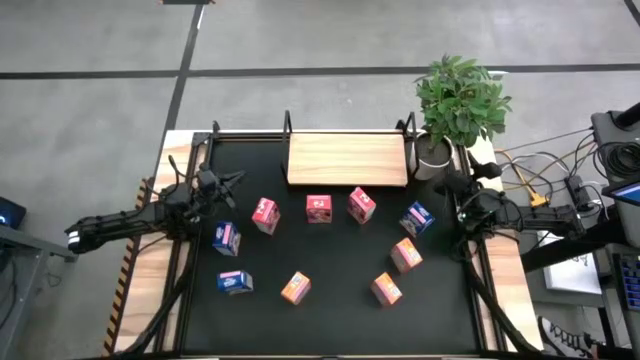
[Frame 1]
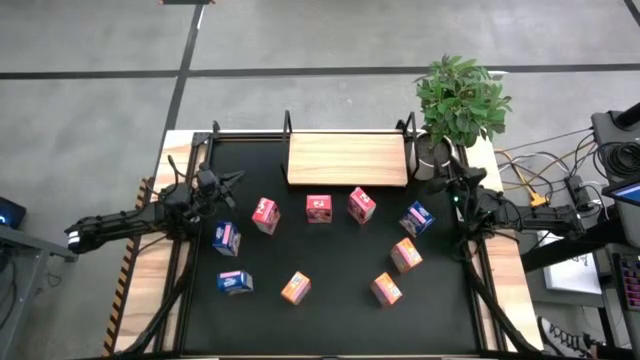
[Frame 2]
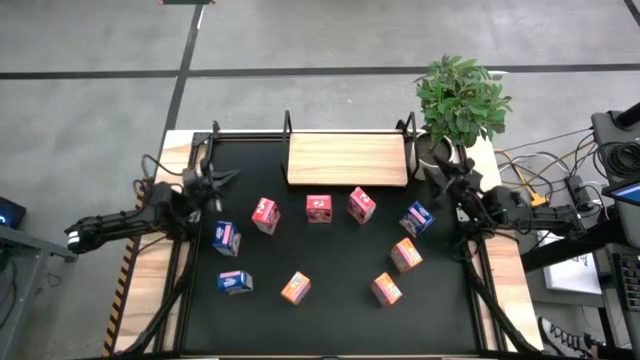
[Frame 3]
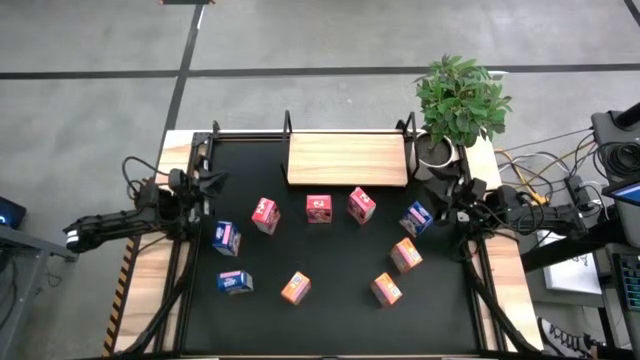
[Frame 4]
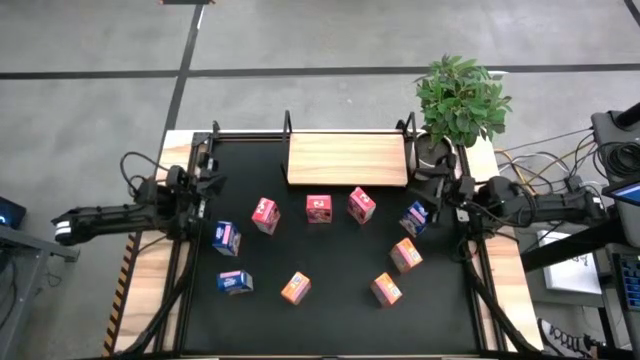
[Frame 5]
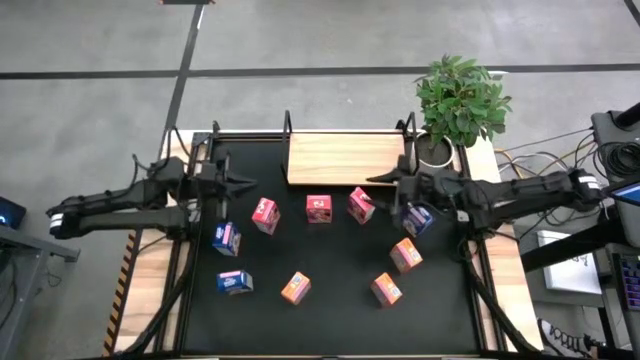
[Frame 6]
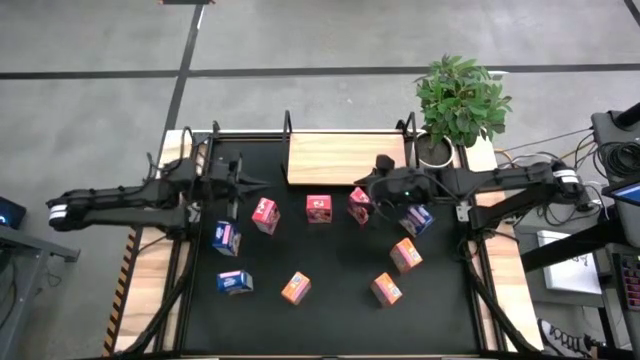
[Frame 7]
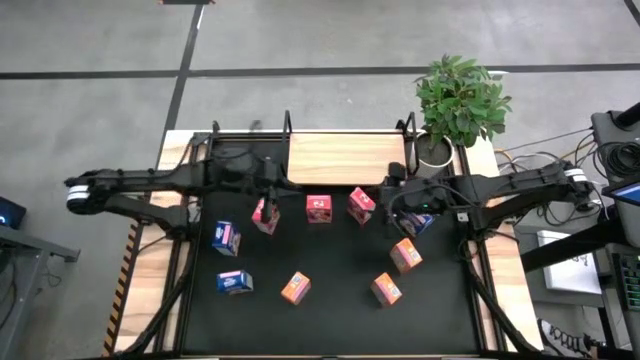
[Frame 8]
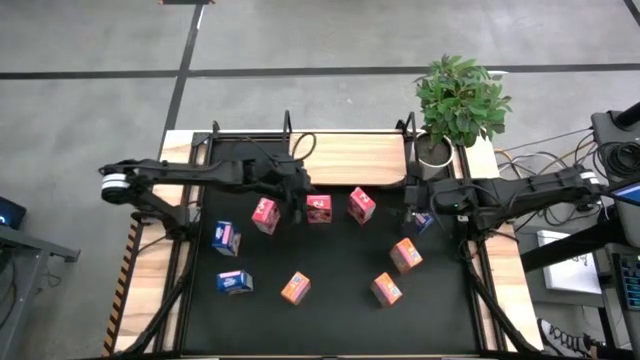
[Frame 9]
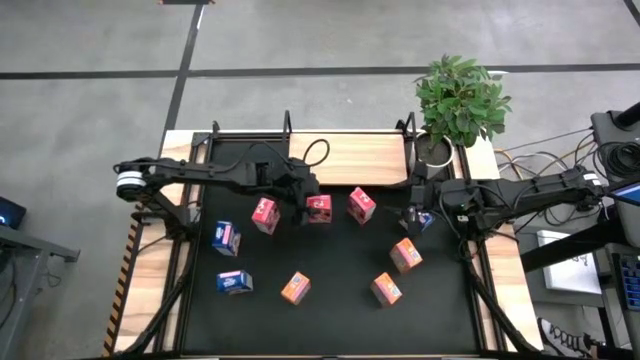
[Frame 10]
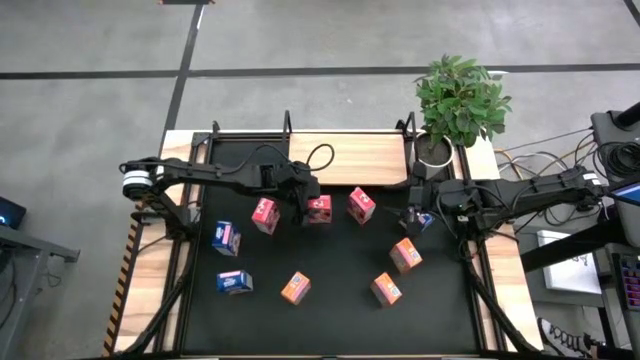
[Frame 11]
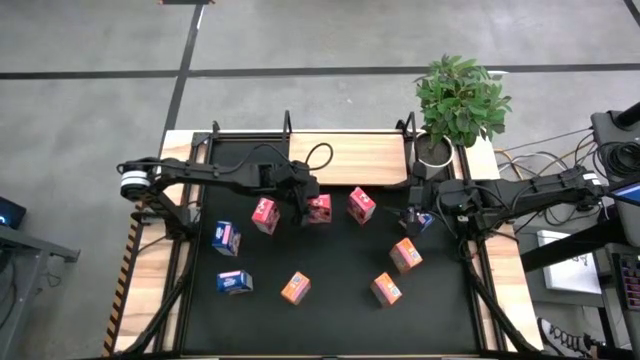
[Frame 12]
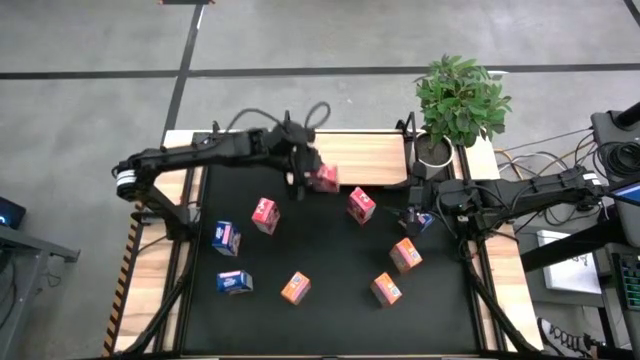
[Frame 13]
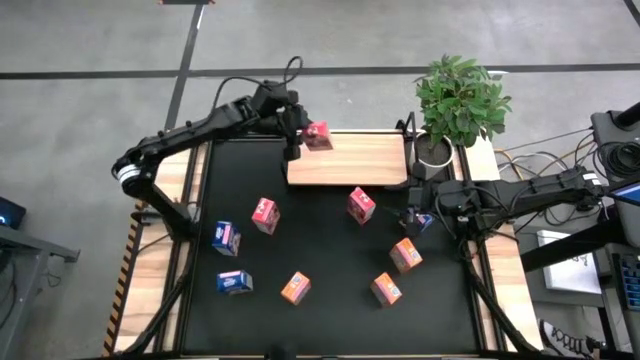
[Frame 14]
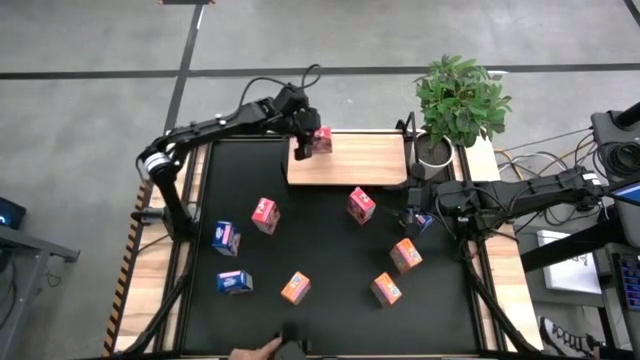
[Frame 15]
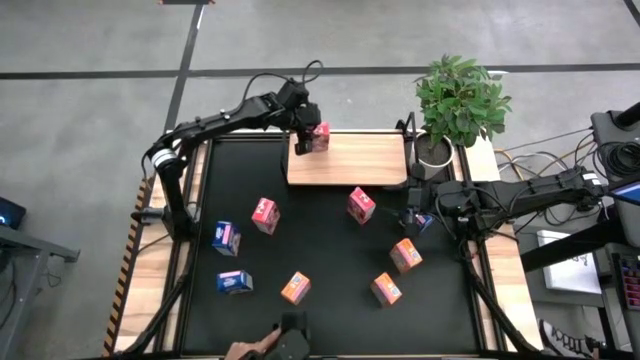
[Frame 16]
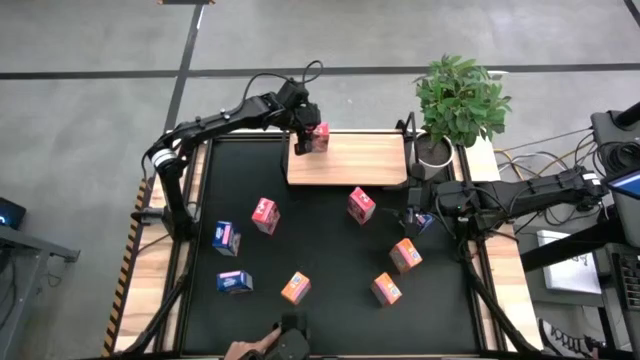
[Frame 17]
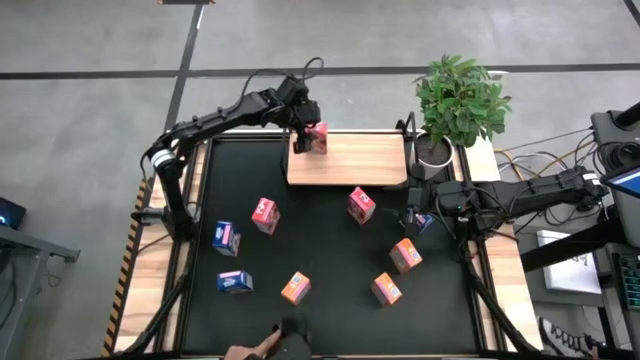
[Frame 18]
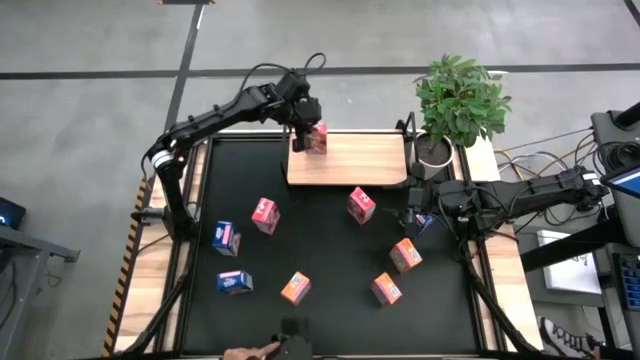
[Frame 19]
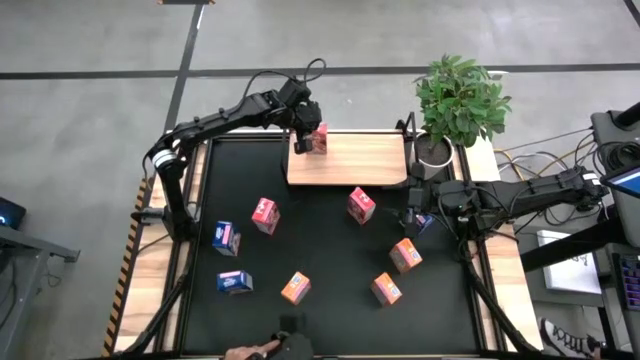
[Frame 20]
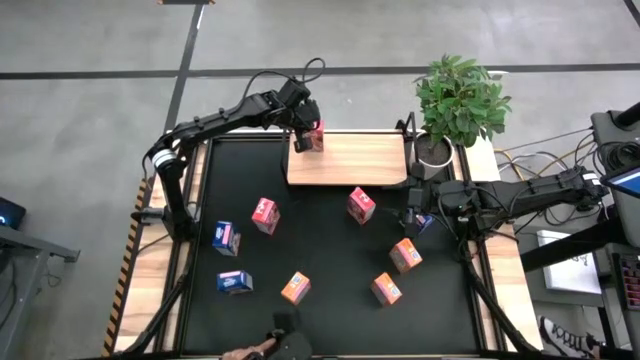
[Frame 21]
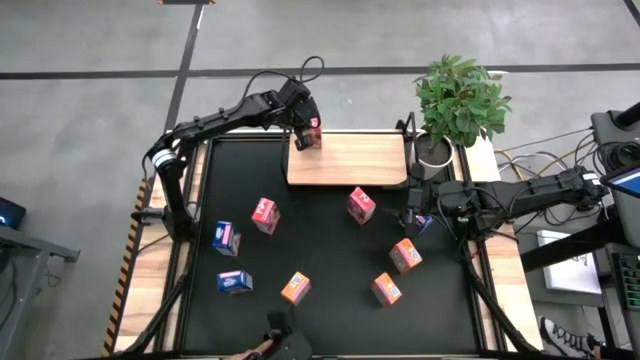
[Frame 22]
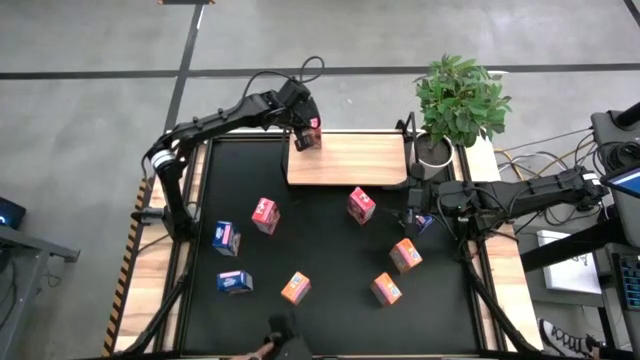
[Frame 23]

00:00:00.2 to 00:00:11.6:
Task: Stack cereal on shelf
Put the middle red cereal box on the shelf

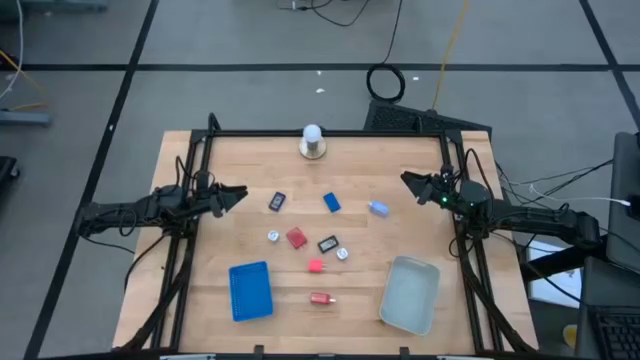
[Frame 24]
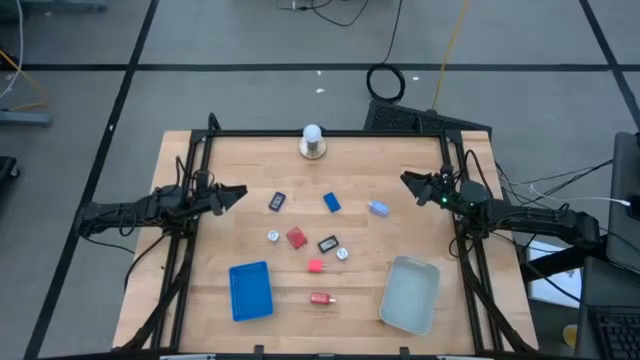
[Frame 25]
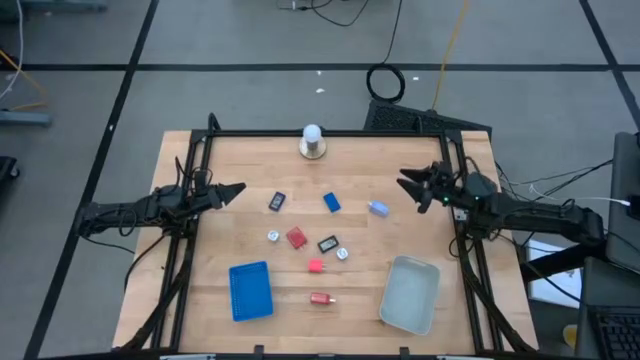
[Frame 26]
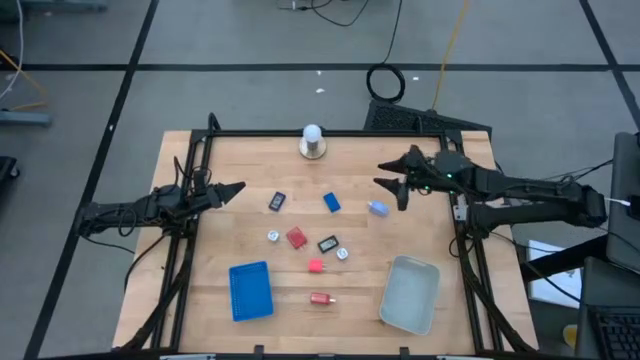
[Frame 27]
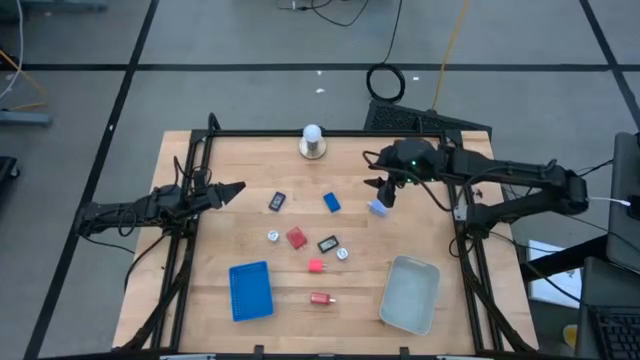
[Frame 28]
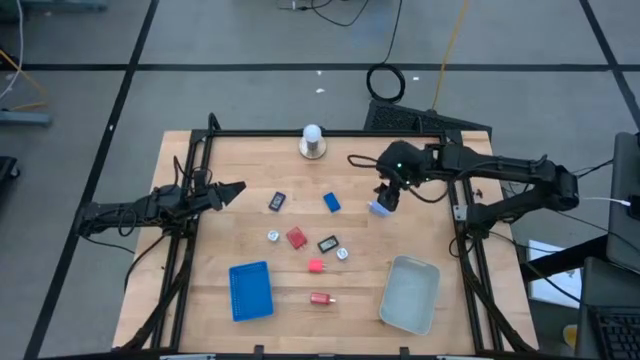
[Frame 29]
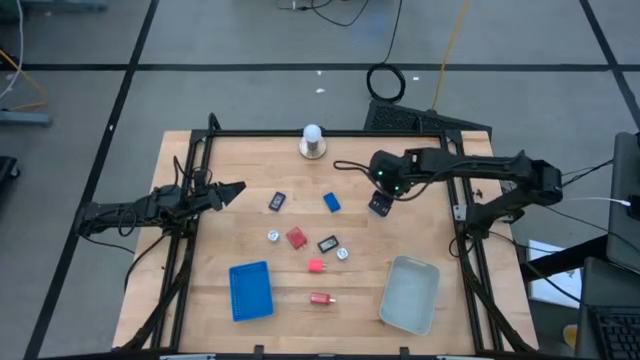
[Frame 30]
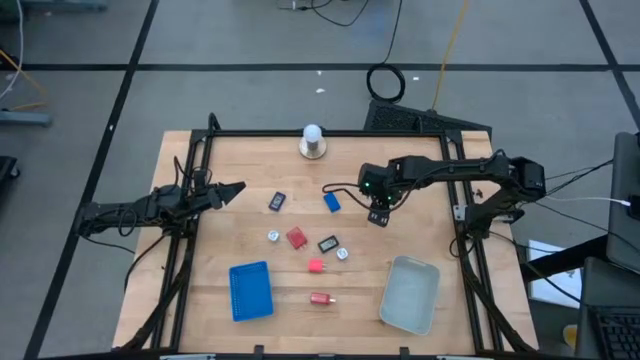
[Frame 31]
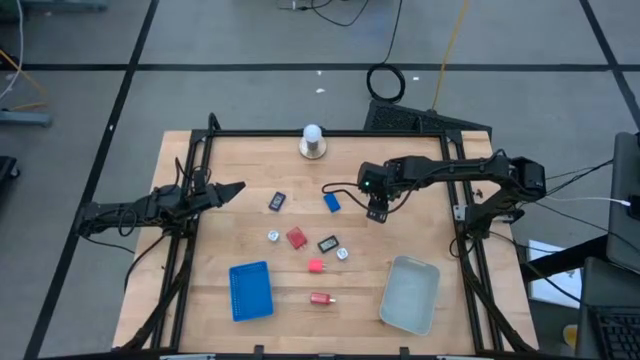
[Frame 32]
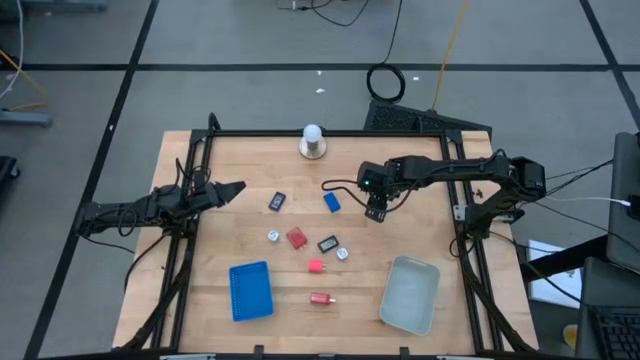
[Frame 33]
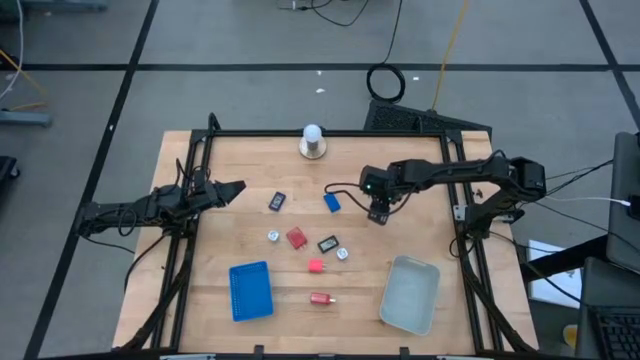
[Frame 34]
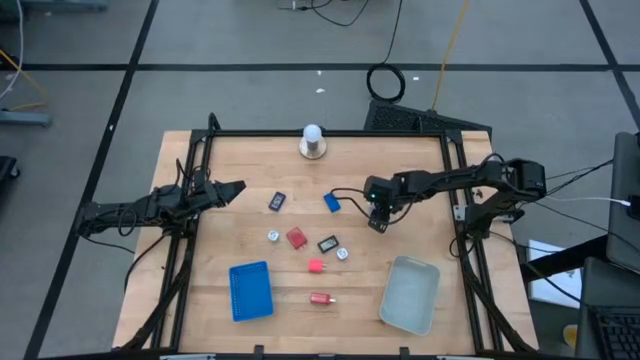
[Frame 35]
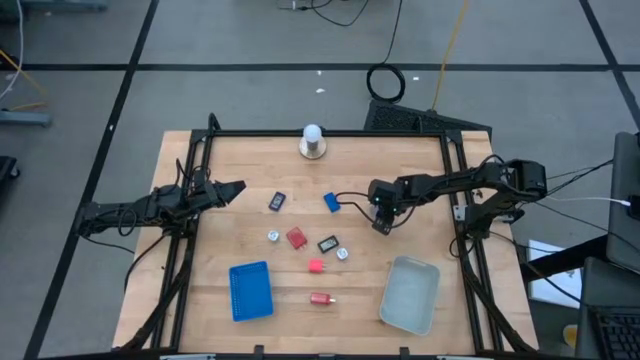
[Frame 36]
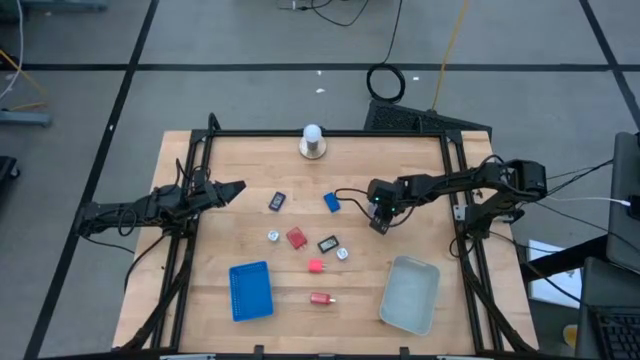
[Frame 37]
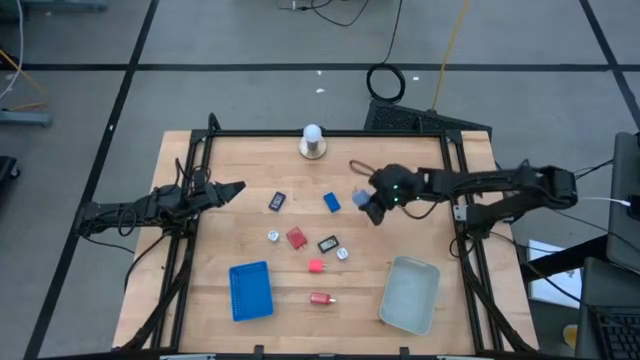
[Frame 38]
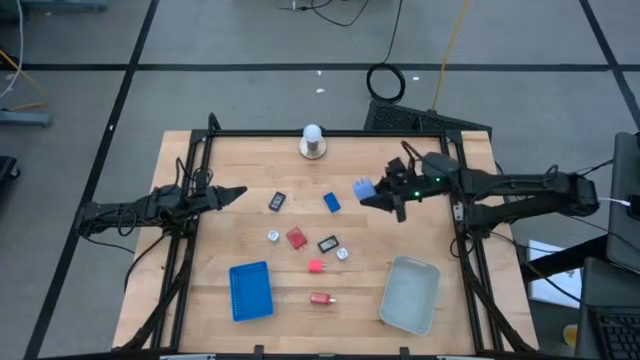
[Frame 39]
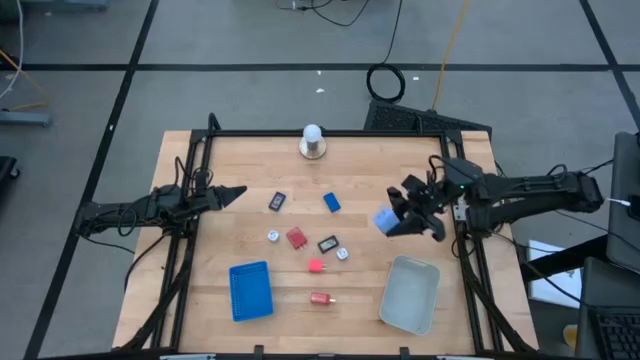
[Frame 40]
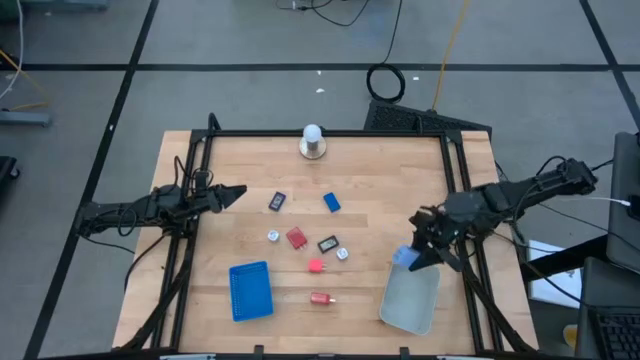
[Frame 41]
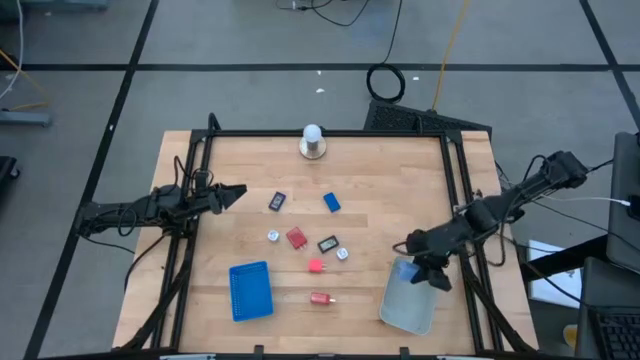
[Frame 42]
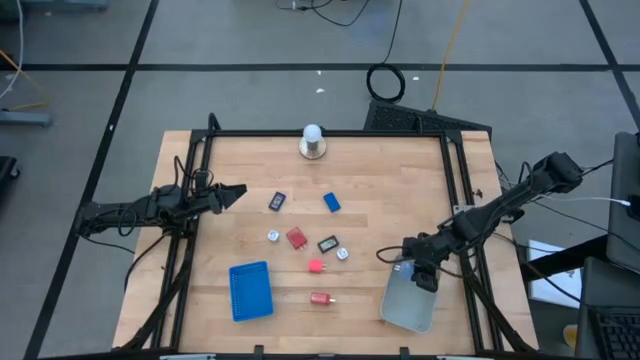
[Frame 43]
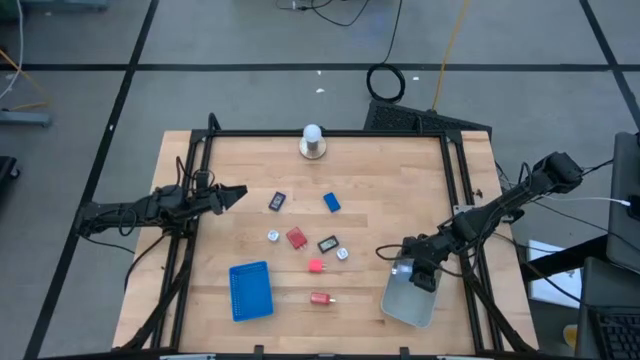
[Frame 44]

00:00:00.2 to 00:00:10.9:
Task: Pick & Place Office items
Put the light blue charger adapter into the gray bin
